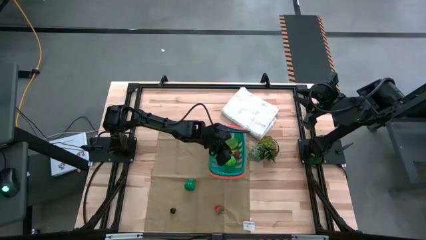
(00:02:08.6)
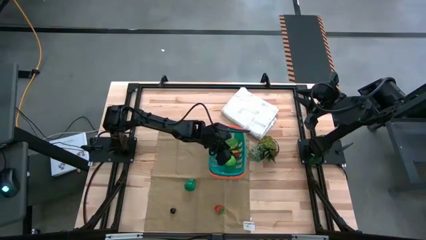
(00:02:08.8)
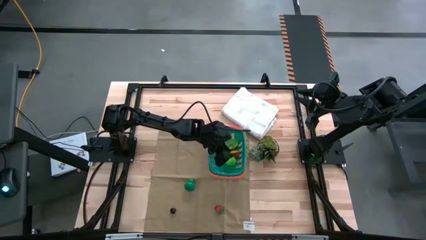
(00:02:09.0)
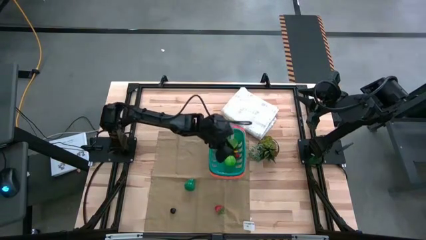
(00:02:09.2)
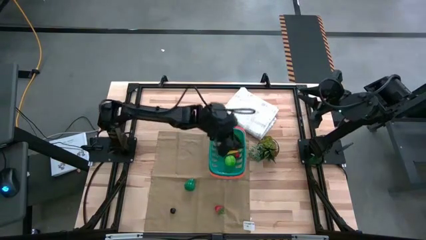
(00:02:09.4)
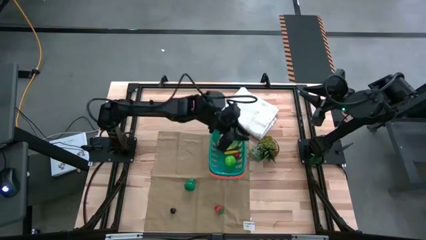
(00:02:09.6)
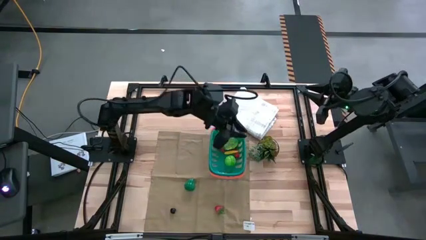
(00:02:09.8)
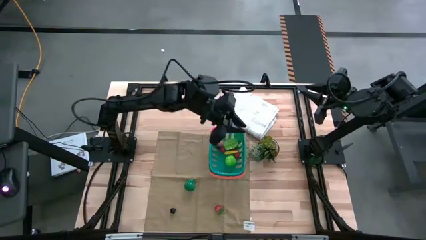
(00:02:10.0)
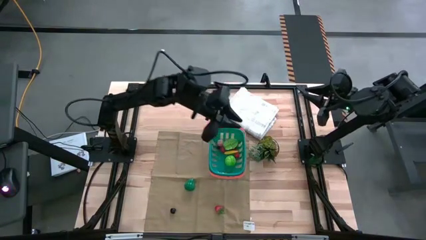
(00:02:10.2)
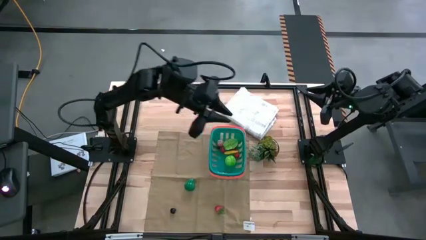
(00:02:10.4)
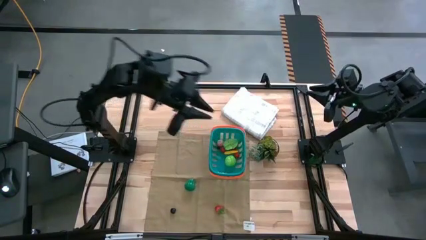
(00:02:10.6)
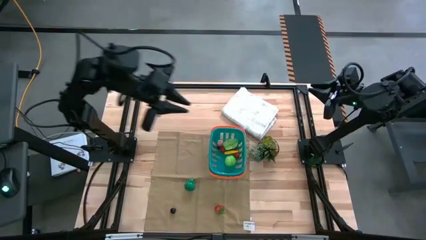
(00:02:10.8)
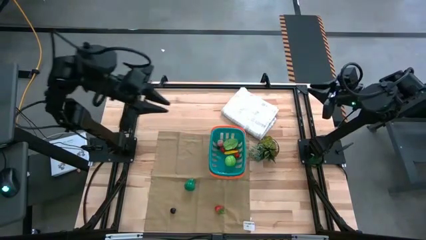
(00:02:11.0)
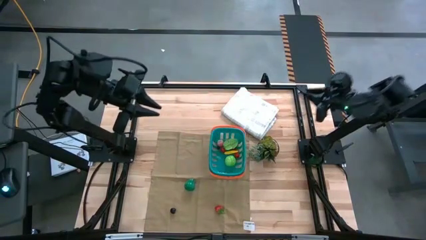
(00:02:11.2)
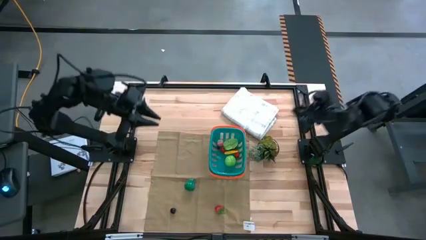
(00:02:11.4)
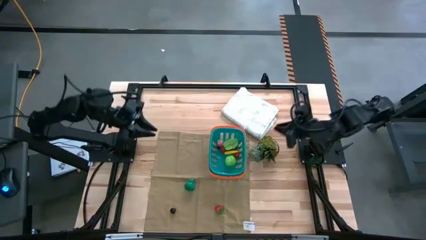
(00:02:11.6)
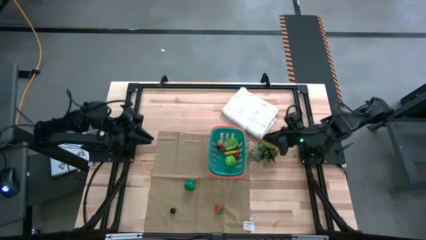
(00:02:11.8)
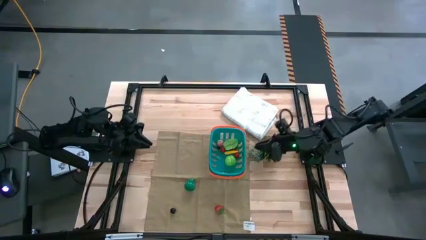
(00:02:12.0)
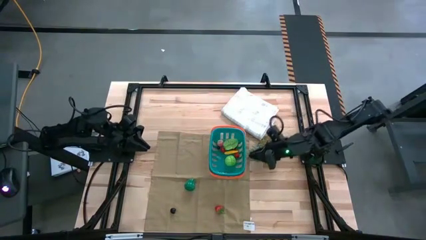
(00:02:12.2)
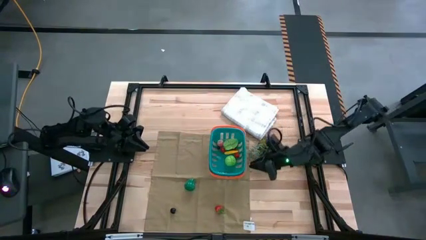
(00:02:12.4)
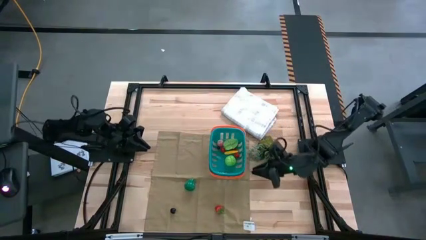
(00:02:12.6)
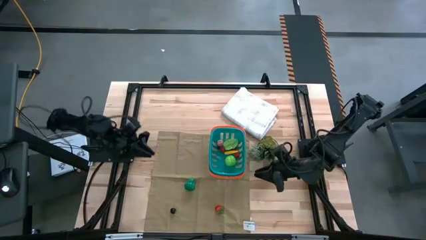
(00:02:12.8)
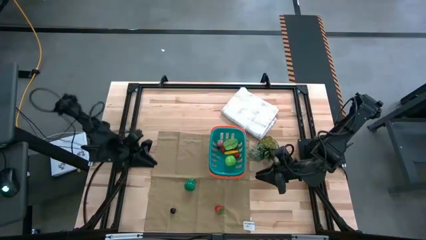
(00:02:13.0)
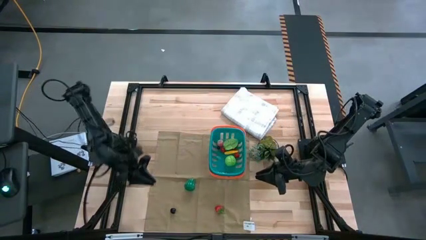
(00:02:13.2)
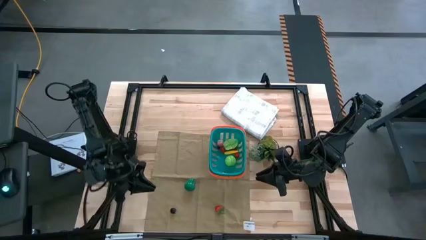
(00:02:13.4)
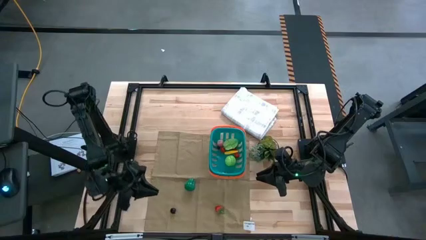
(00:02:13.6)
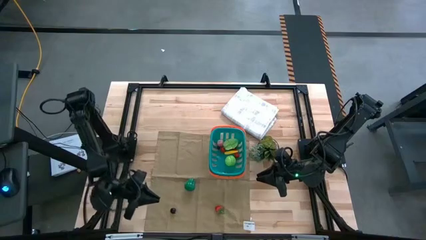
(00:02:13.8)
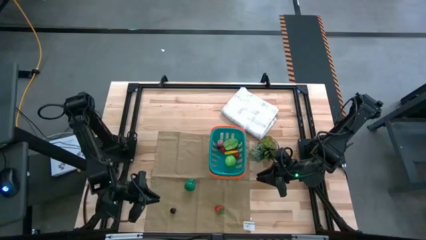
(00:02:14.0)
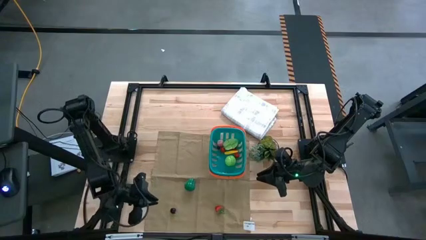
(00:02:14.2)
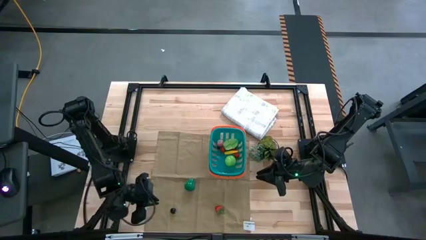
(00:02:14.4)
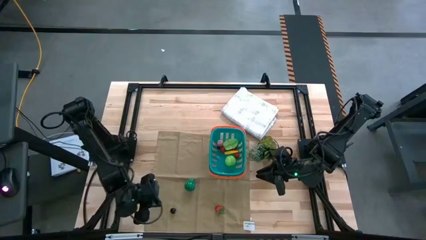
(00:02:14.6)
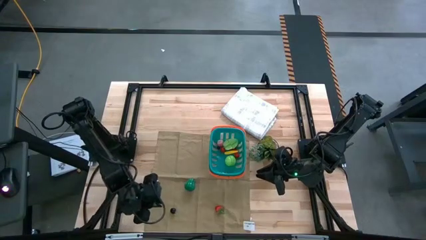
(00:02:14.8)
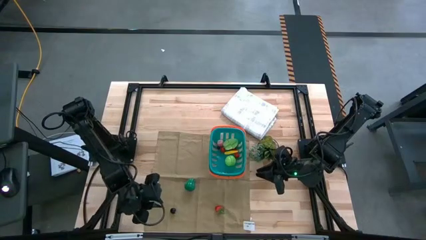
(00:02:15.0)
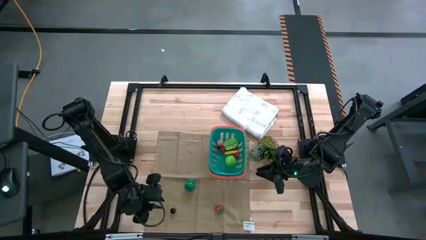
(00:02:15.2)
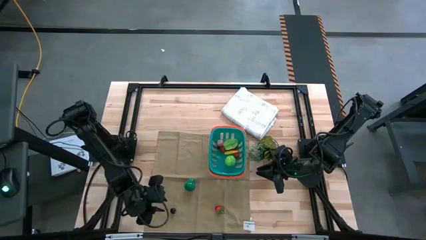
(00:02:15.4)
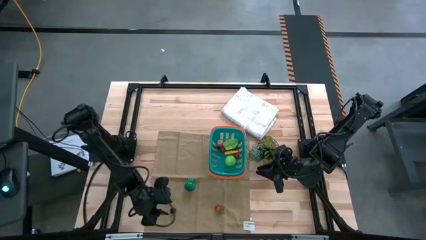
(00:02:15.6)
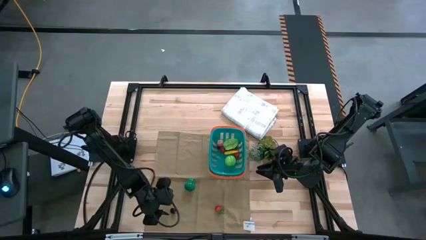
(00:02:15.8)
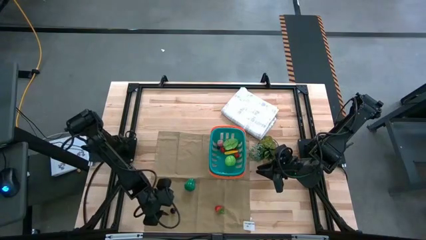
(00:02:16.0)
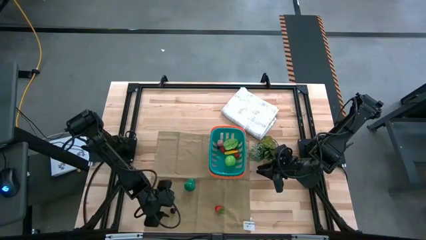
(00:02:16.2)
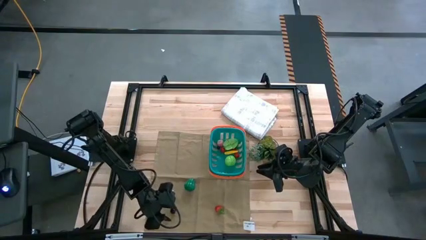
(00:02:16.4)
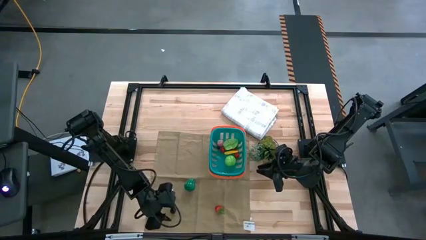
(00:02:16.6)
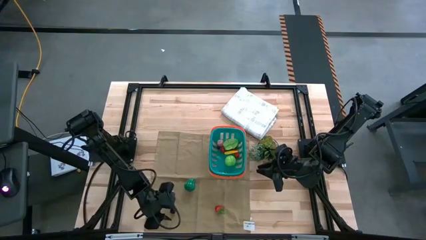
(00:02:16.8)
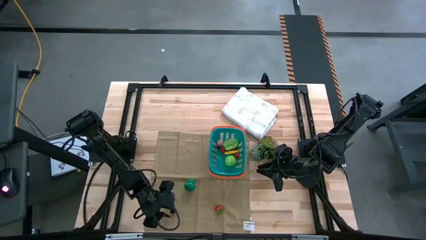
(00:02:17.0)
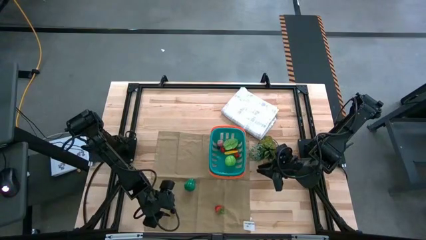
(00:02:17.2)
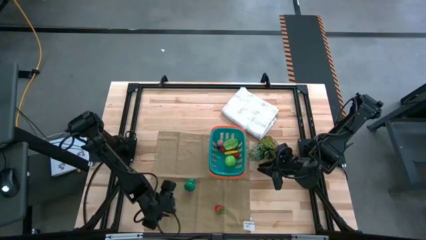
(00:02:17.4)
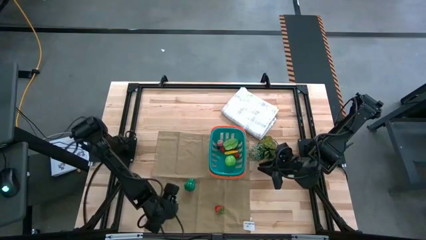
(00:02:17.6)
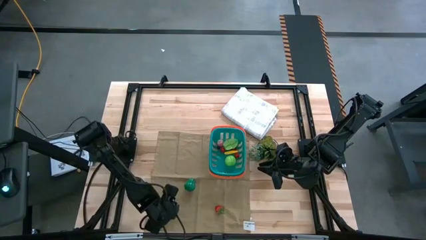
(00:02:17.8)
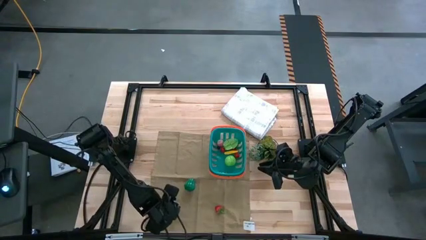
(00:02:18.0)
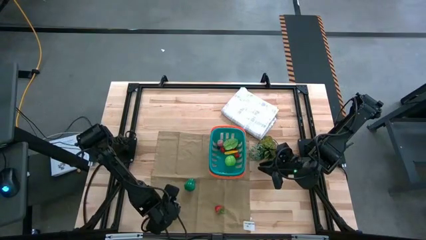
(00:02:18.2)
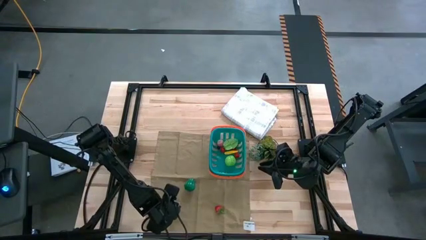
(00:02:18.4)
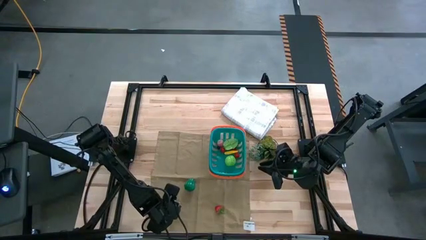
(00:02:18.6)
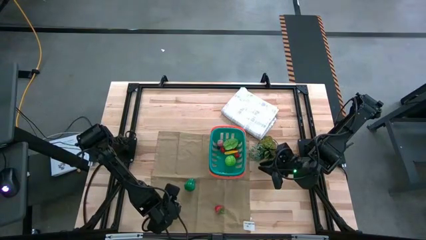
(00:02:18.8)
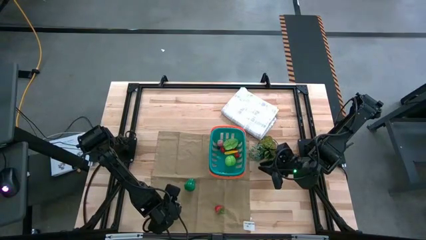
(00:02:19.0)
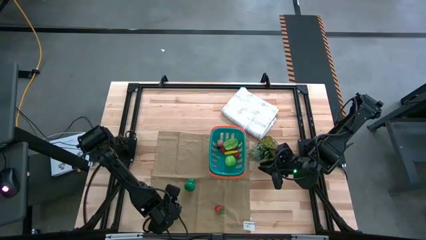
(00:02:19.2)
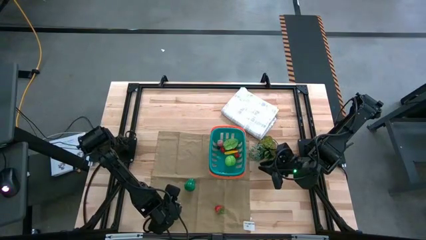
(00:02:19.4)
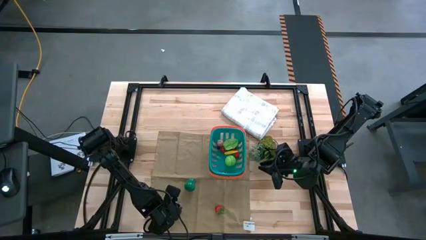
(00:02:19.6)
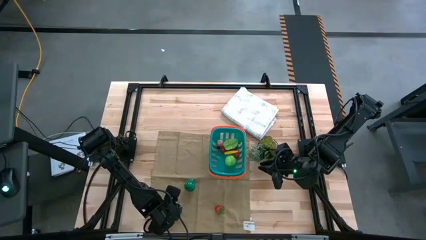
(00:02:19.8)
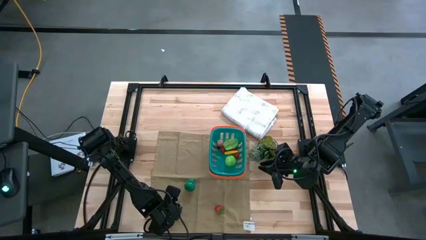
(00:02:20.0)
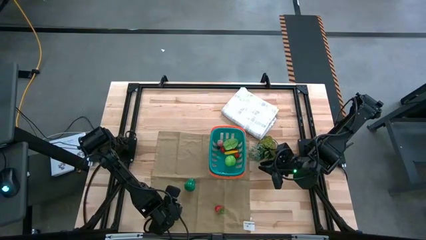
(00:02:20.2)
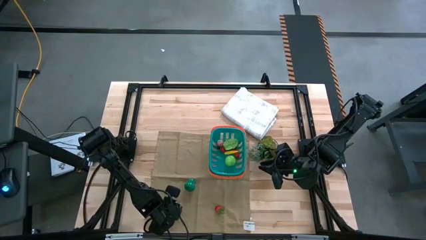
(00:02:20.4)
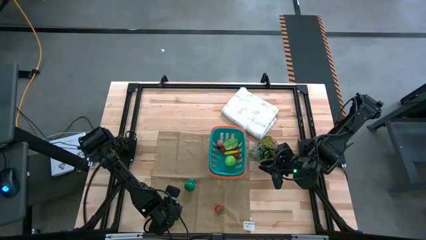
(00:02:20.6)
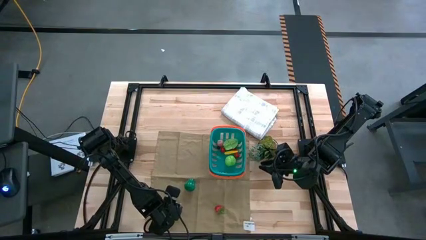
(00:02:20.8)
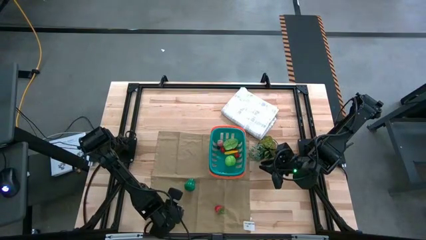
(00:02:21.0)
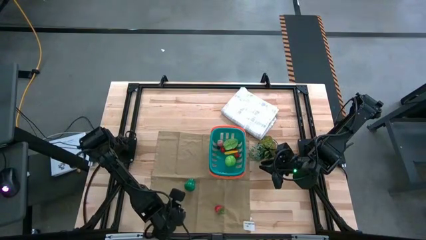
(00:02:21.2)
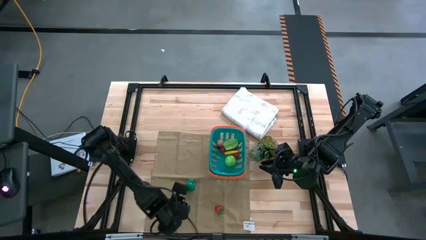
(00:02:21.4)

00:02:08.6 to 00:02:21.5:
Task: Pick and placing Produce into tupperware
Put the black cherry into the blue basket
